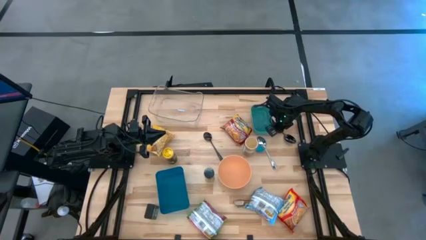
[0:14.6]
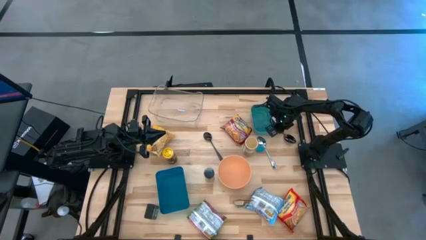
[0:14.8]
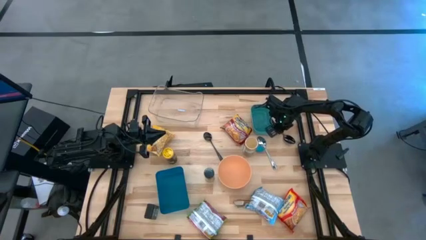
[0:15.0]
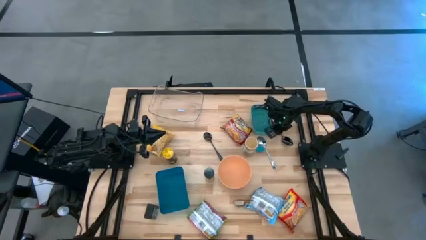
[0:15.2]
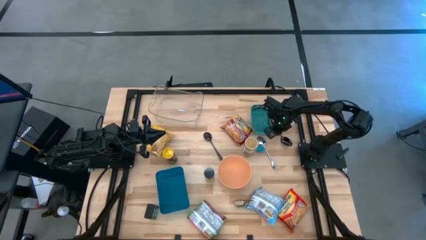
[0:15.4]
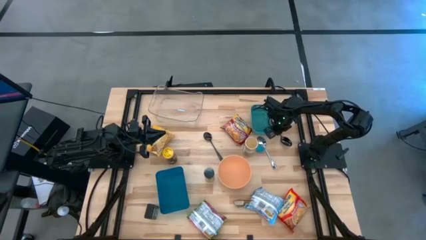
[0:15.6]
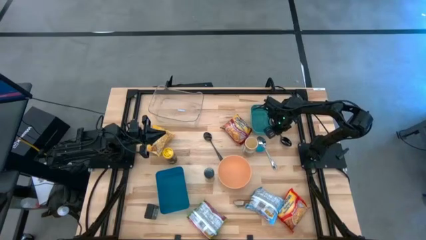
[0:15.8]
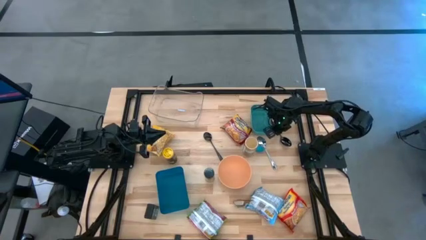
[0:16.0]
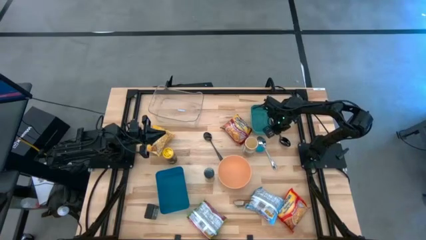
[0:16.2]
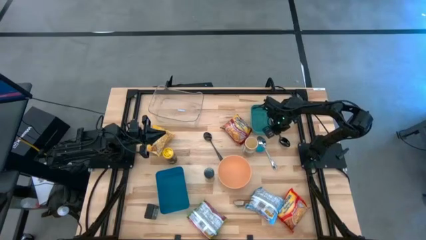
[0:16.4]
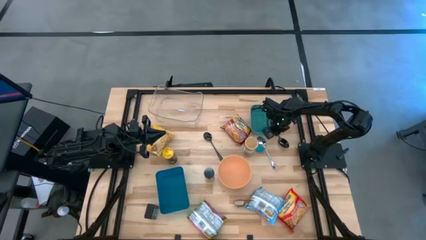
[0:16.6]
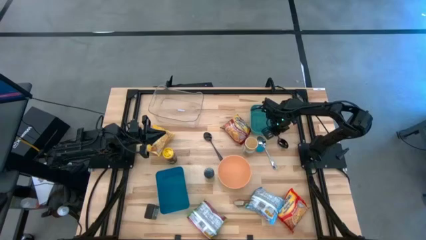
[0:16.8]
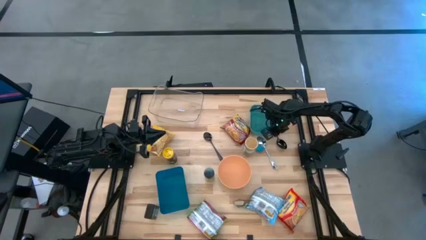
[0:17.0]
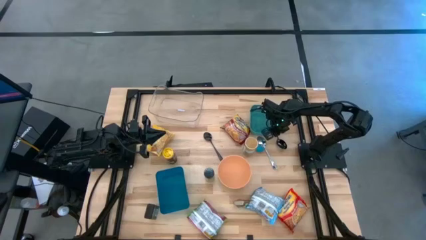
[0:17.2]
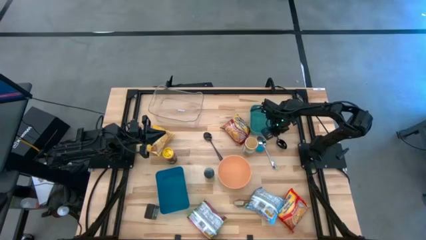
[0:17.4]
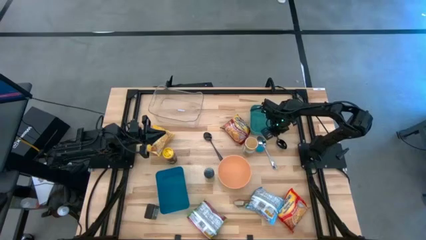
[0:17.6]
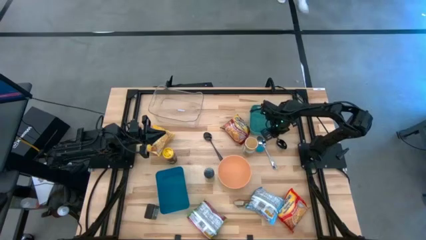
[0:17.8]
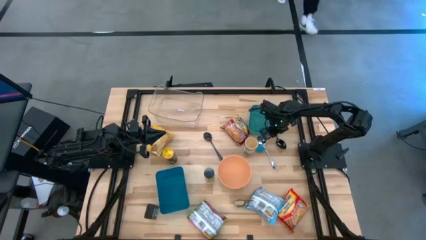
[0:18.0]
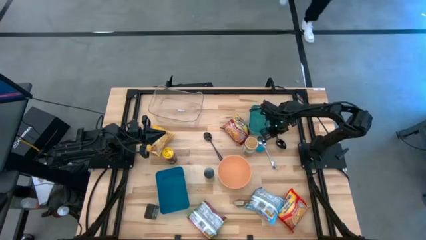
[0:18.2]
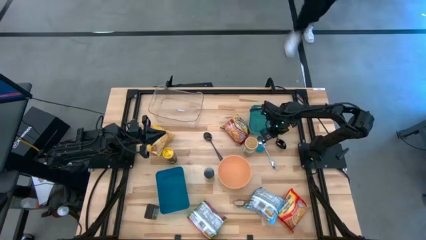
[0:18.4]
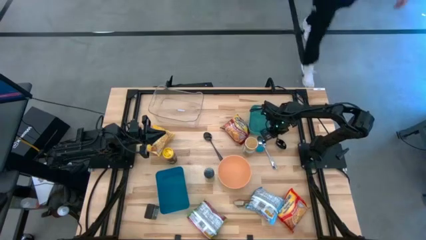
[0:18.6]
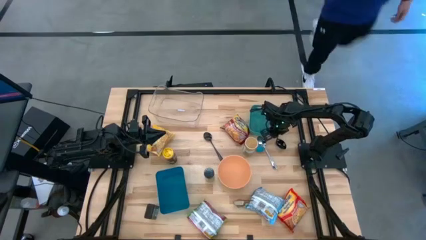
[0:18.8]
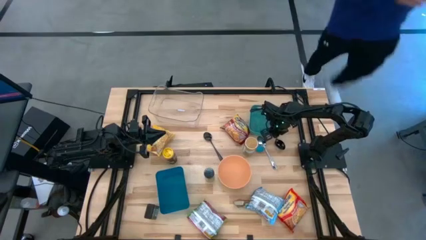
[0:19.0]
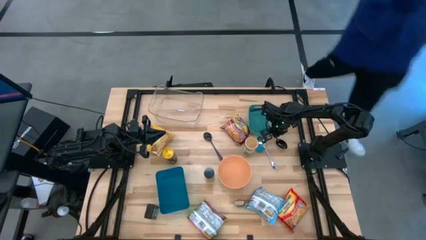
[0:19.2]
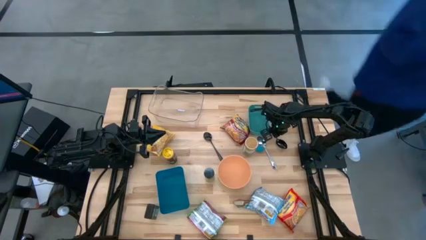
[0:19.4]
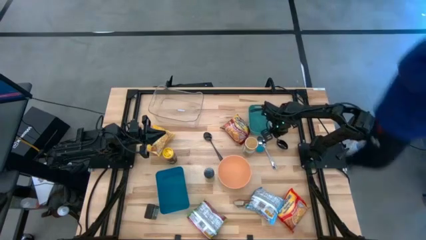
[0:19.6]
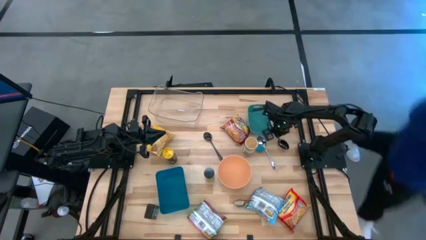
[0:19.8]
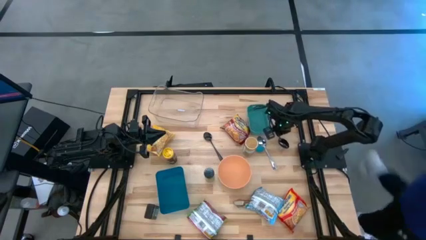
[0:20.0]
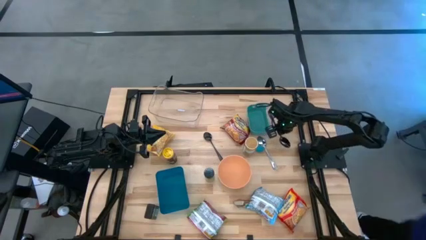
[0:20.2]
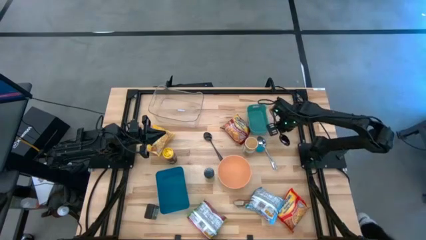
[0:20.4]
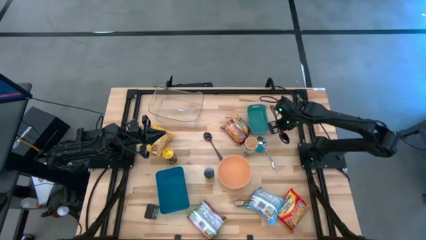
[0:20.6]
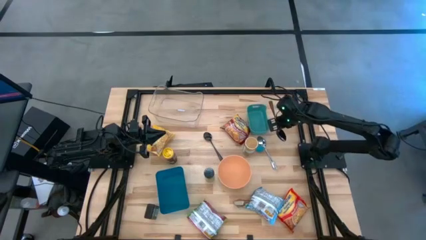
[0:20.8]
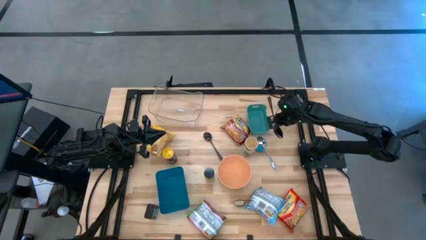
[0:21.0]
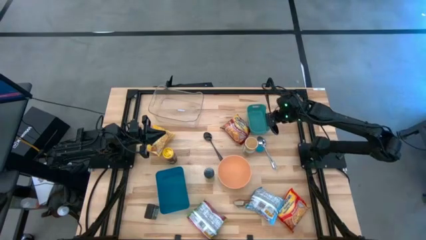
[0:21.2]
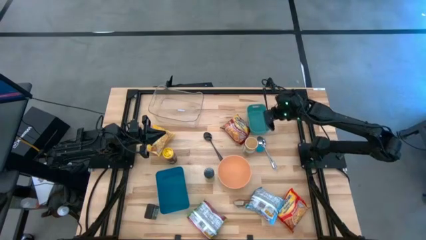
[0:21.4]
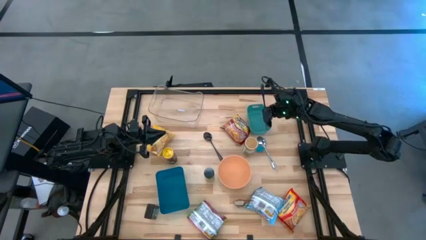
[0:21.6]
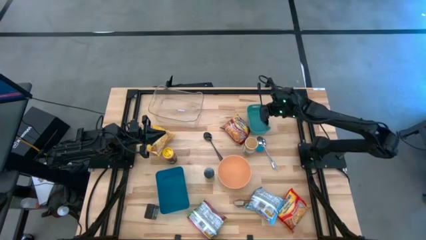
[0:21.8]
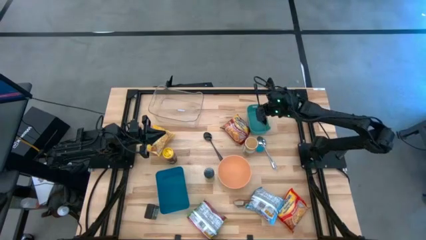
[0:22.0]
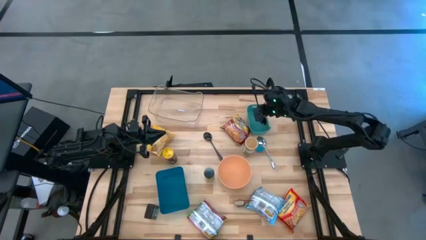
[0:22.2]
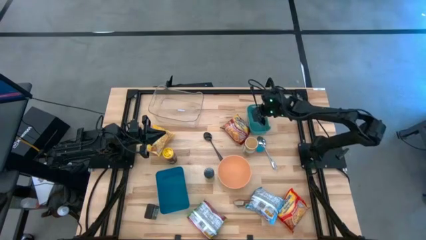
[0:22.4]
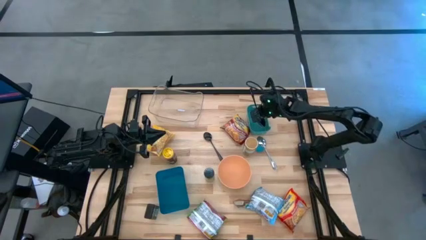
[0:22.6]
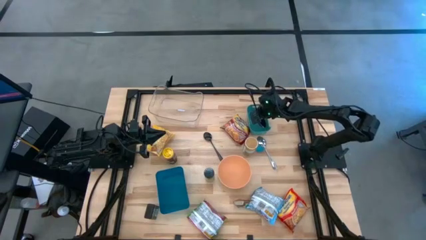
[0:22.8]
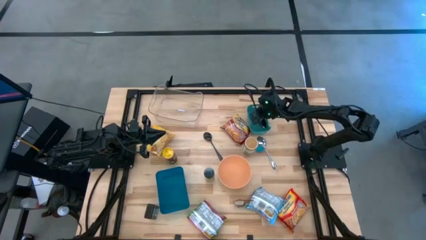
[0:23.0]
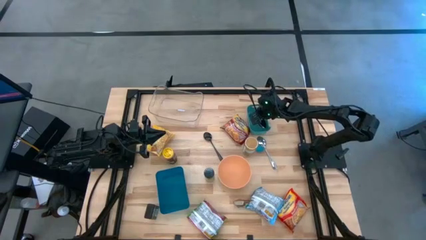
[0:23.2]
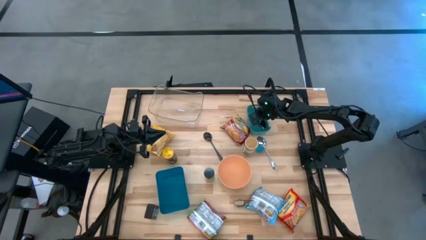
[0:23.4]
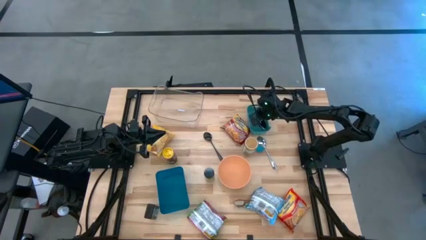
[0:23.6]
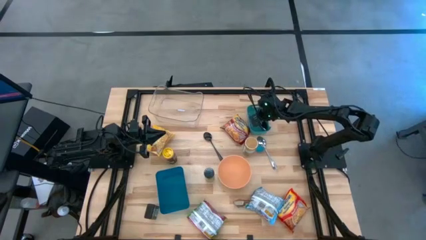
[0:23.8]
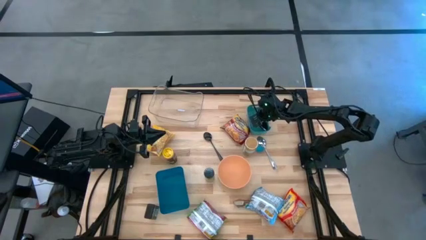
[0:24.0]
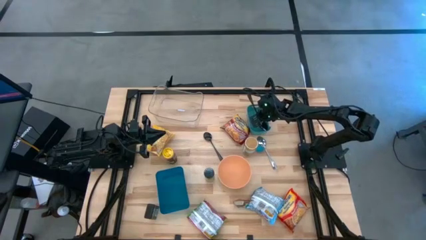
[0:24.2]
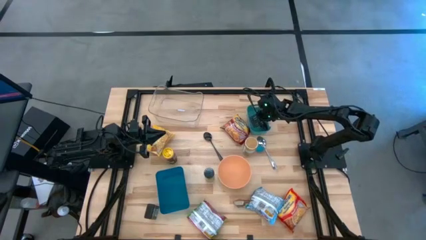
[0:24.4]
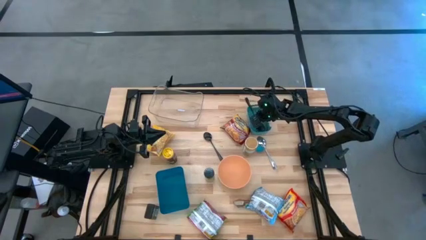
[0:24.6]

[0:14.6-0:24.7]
Task: Pick & Place Food Item
Put the right black spoon into the green bin

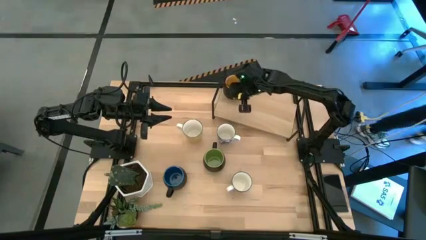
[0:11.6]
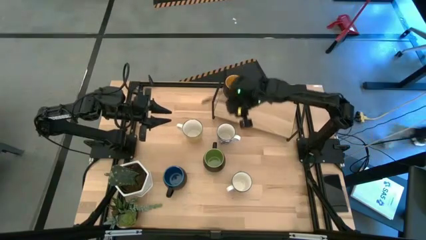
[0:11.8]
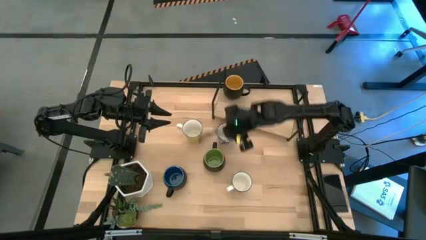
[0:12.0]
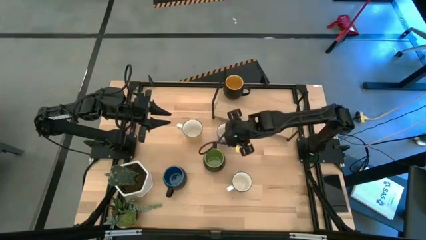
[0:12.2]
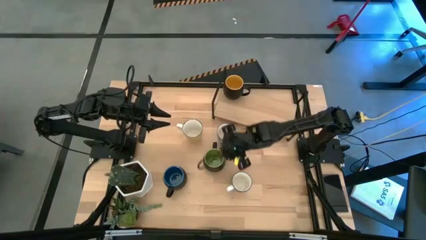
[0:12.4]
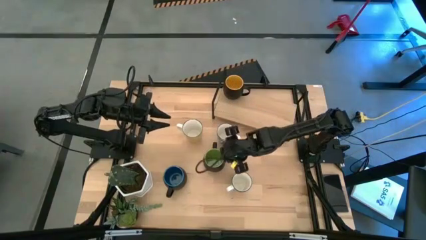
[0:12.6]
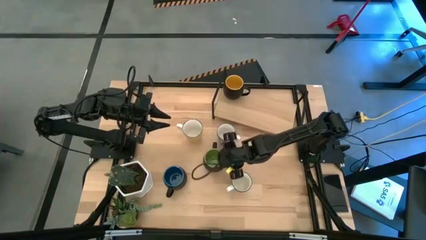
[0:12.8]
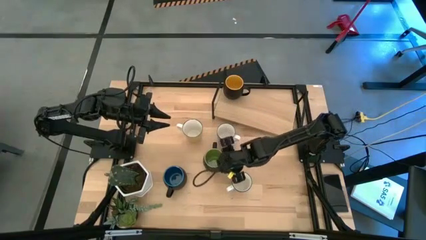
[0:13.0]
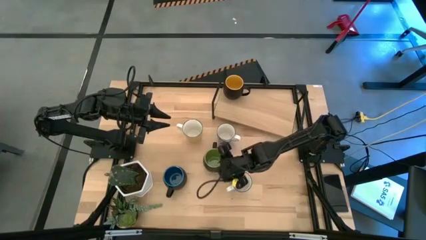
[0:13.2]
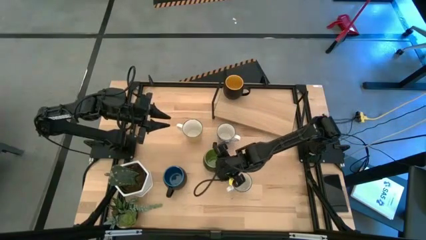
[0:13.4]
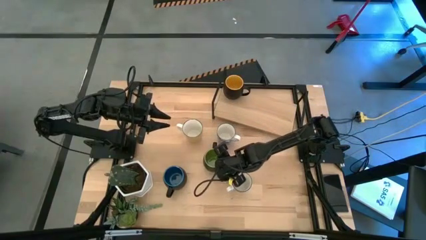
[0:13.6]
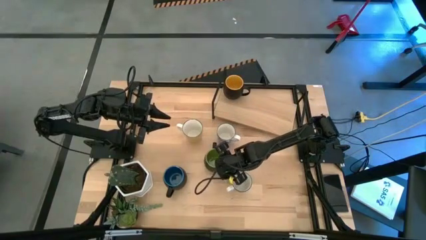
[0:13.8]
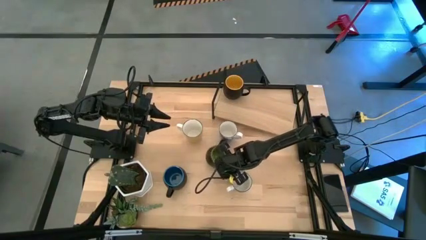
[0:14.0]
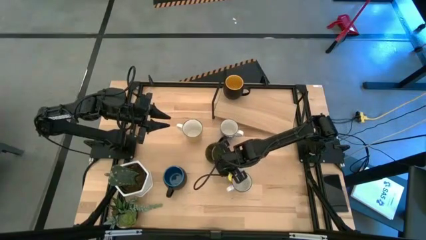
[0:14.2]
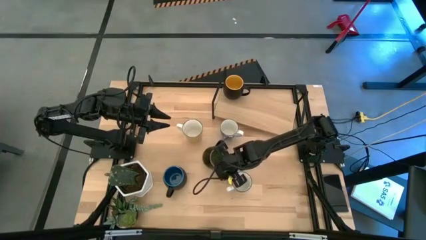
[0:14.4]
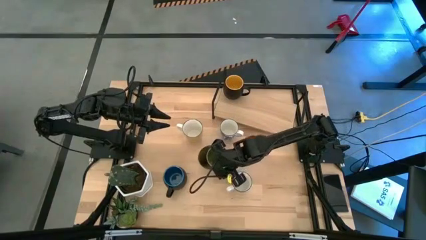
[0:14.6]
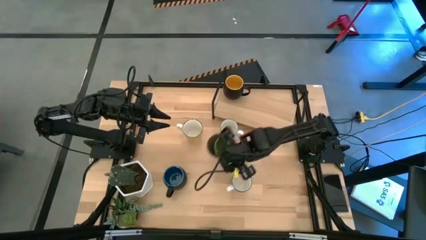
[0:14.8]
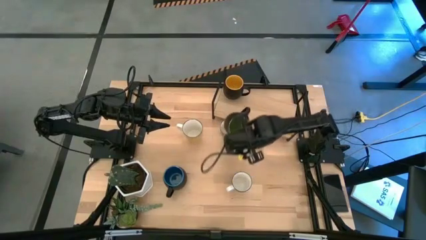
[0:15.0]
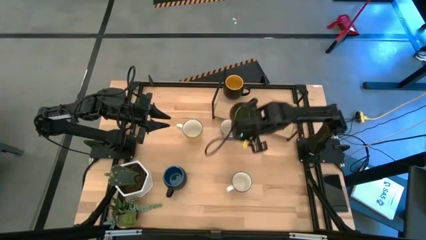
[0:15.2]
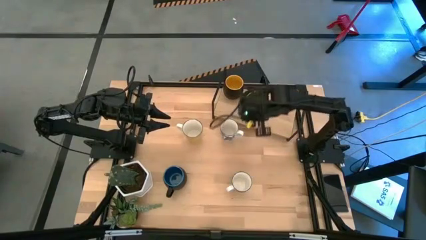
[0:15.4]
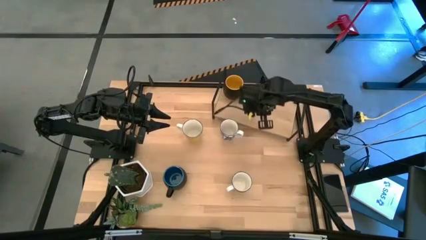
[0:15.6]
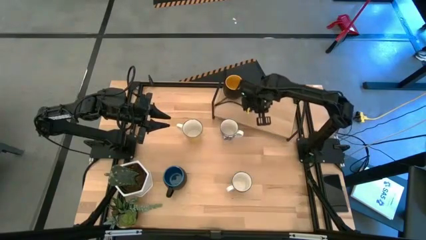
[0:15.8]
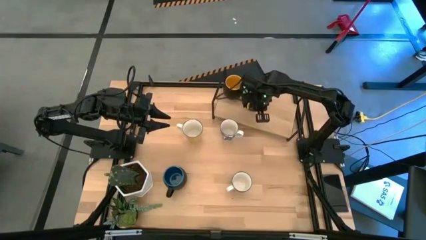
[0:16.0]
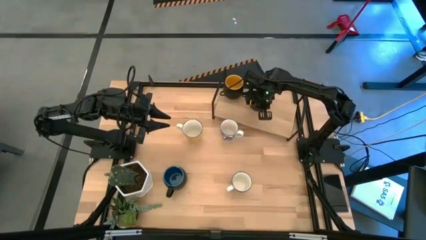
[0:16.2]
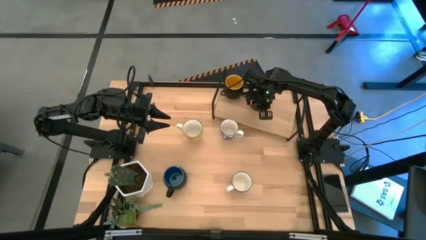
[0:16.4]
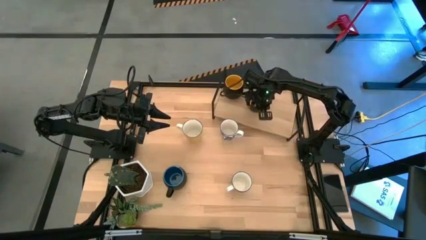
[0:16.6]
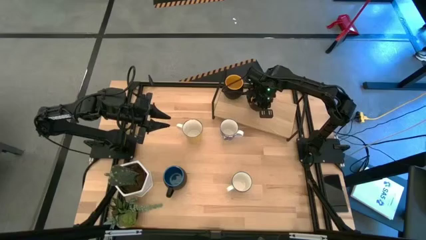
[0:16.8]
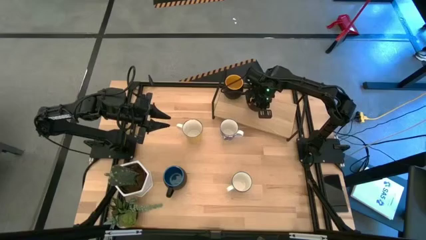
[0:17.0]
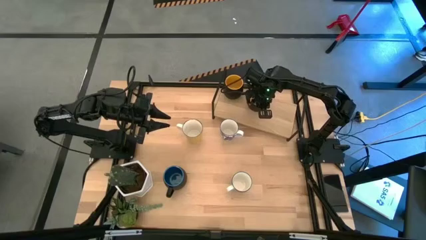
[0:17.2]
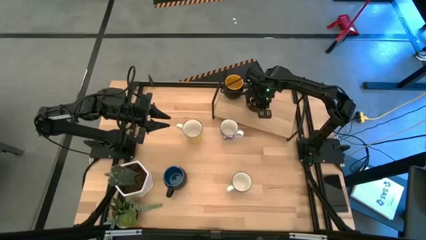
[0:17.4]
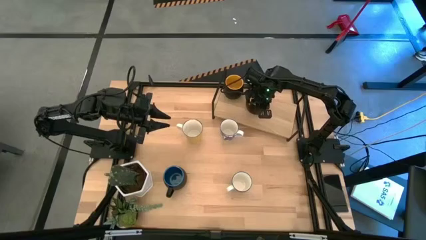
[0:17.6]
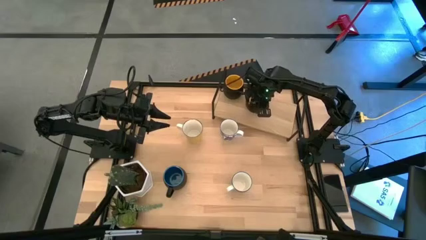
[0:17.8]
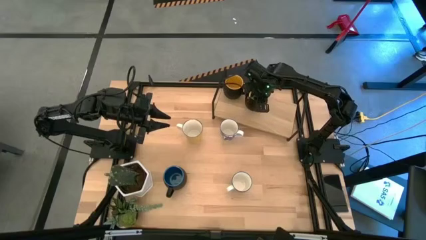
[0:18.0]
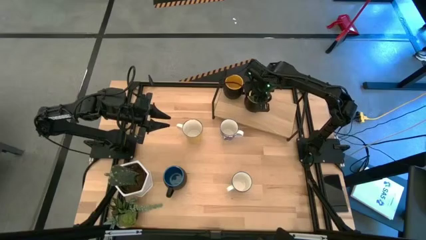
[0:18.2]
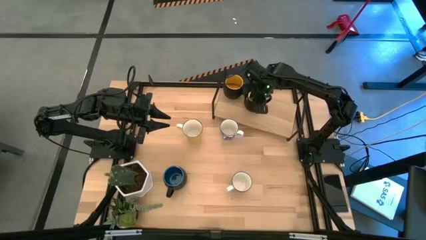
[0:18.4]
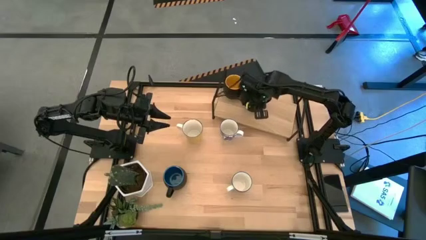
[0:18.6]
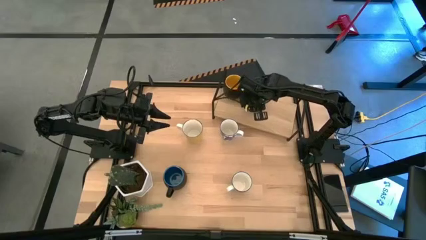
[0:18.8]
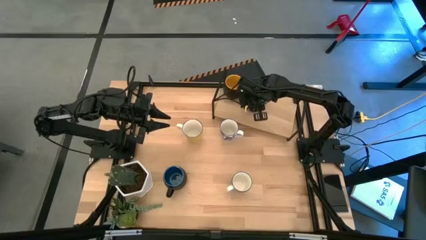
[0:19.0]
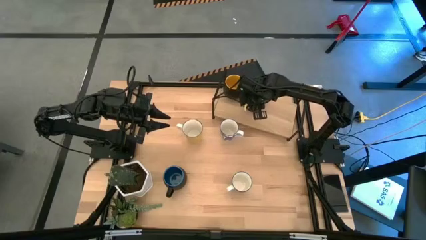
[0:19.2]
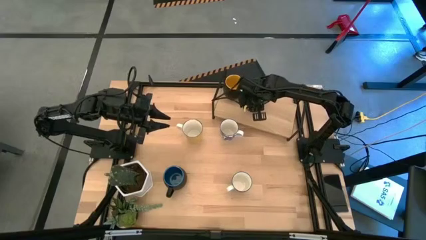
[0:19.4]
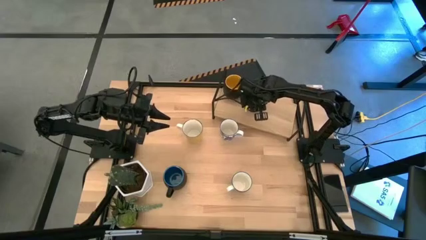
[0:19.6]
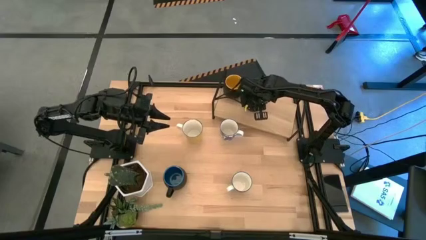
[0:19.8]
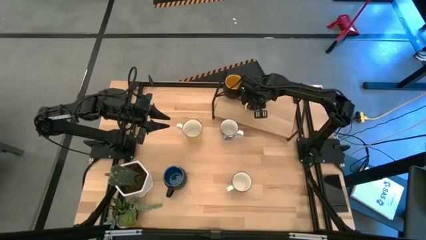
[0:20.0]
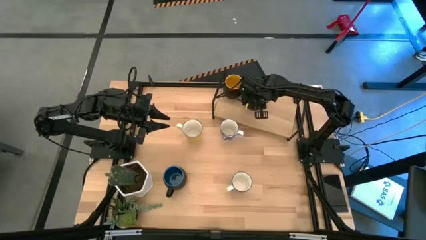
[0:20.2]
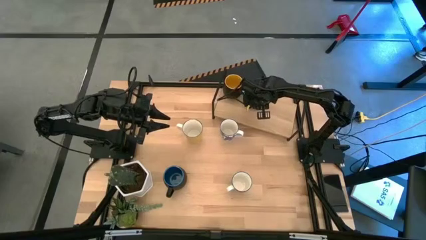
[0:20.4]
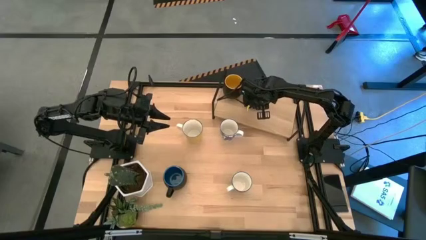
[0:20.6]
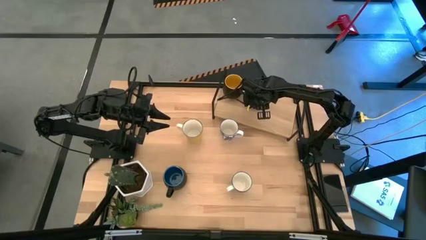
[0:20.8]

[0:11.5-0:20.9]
Task: Place coffee mugs
Put the black-green mug on the shelf
